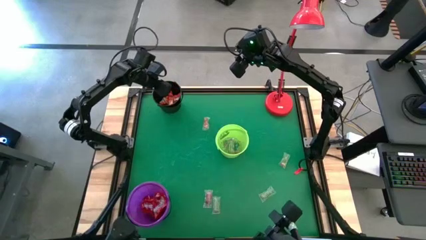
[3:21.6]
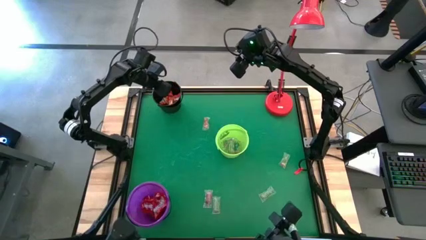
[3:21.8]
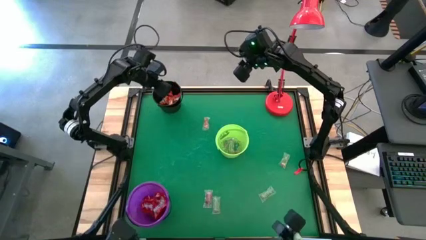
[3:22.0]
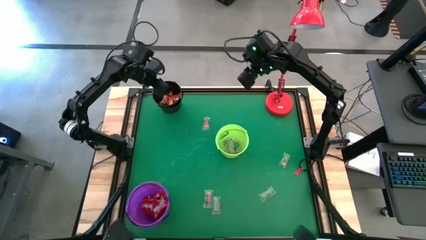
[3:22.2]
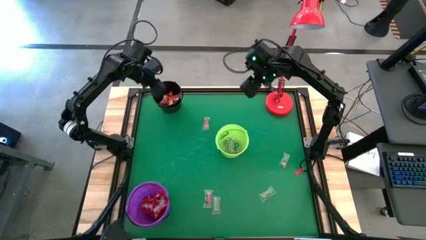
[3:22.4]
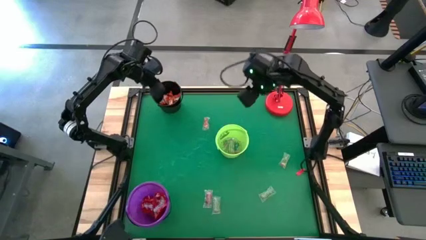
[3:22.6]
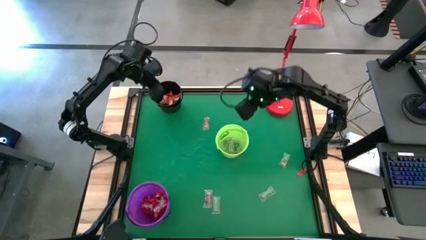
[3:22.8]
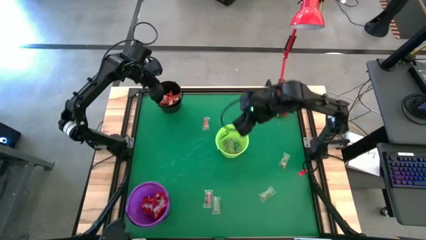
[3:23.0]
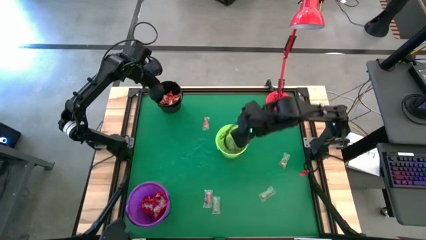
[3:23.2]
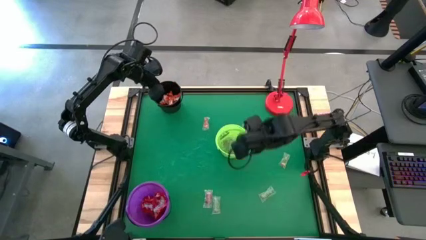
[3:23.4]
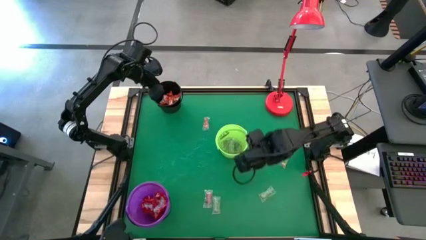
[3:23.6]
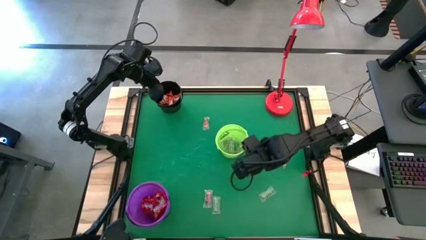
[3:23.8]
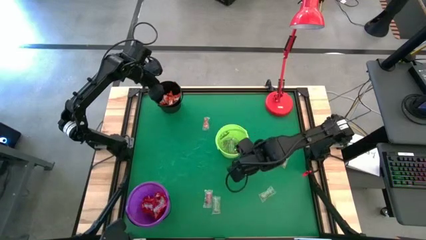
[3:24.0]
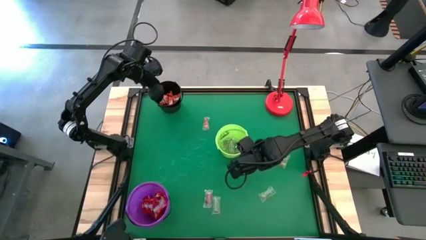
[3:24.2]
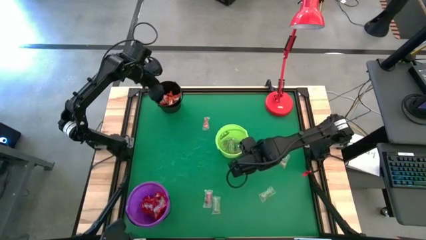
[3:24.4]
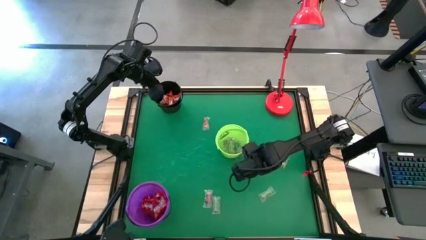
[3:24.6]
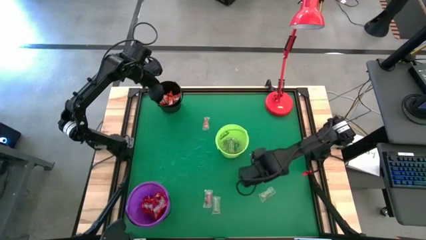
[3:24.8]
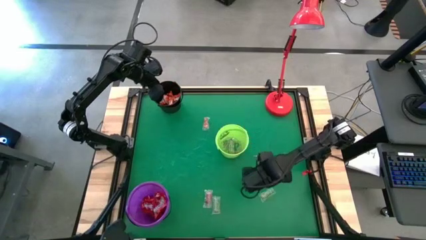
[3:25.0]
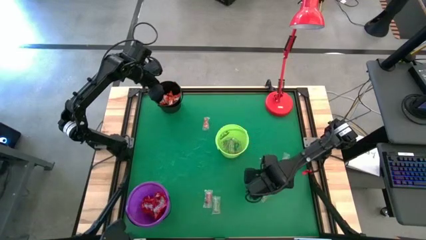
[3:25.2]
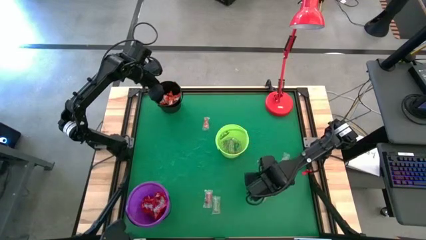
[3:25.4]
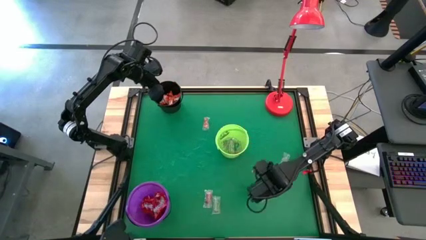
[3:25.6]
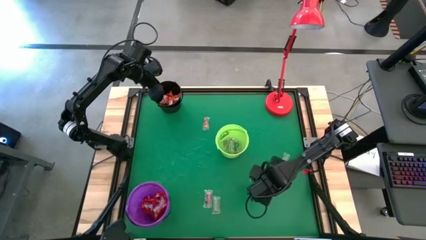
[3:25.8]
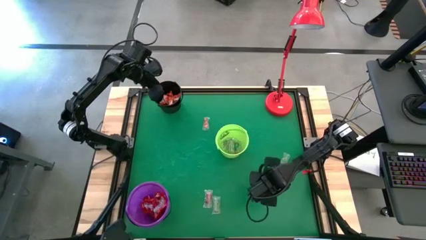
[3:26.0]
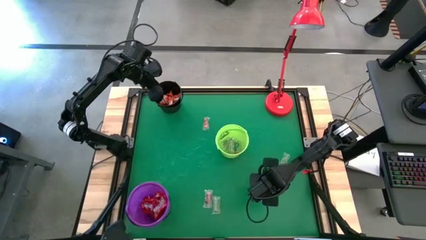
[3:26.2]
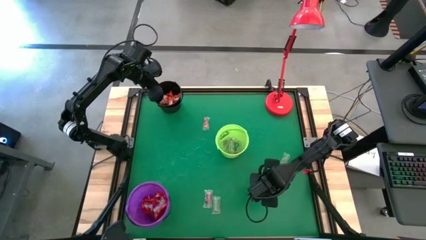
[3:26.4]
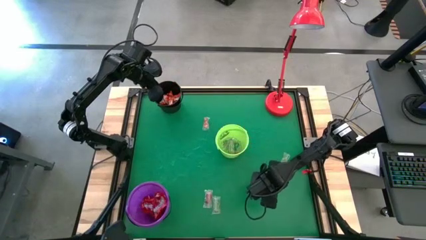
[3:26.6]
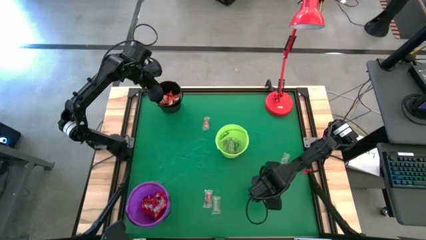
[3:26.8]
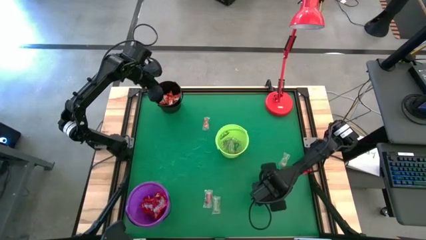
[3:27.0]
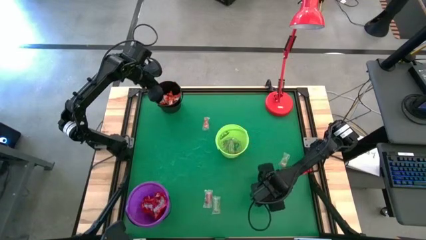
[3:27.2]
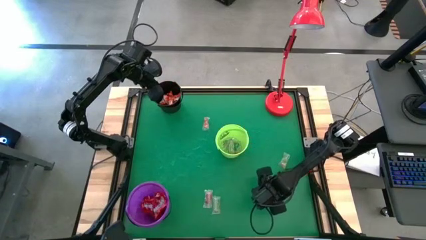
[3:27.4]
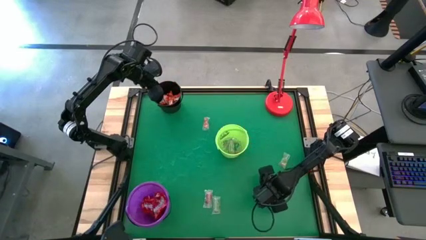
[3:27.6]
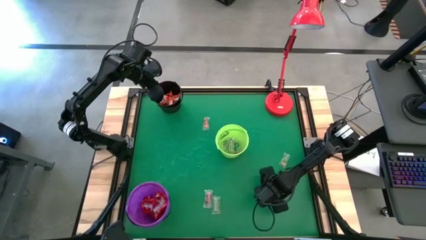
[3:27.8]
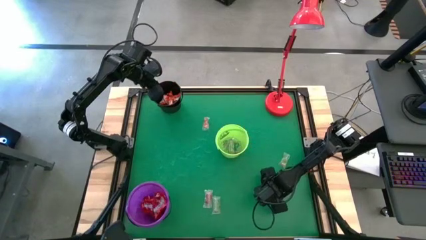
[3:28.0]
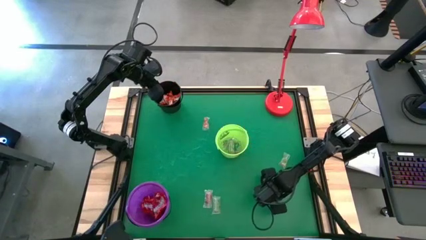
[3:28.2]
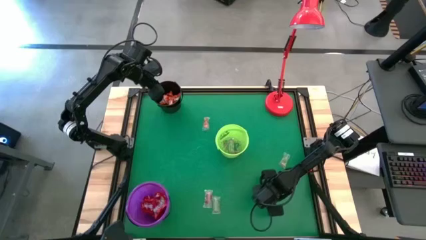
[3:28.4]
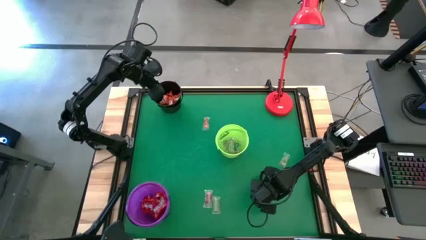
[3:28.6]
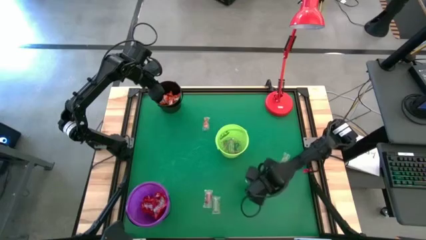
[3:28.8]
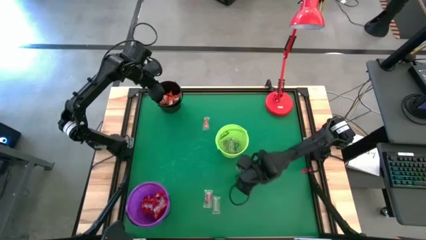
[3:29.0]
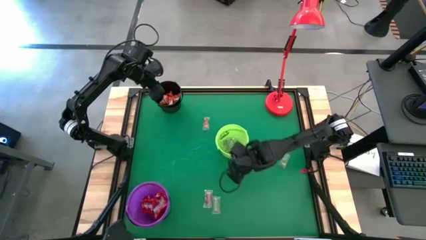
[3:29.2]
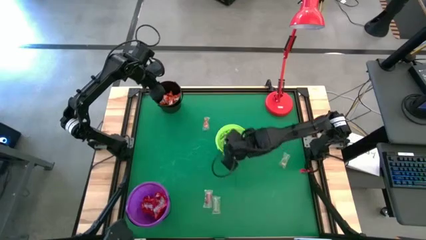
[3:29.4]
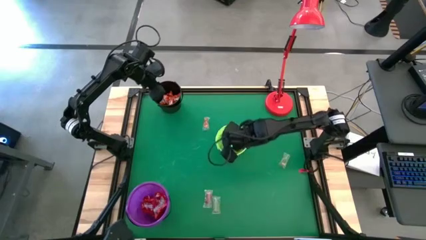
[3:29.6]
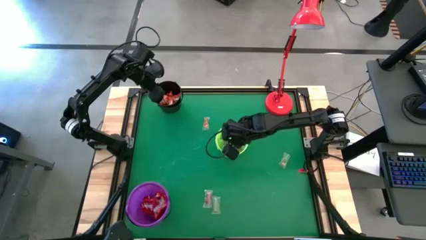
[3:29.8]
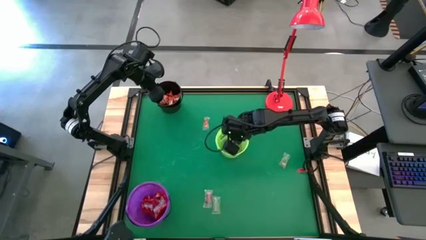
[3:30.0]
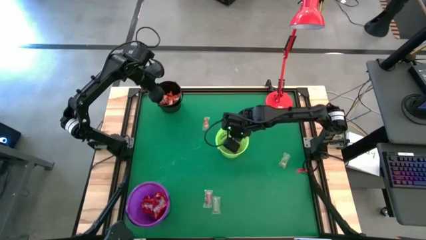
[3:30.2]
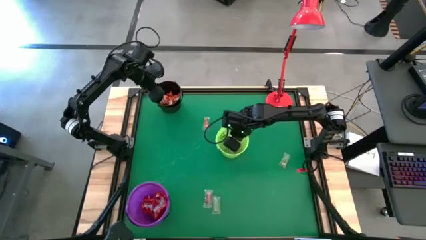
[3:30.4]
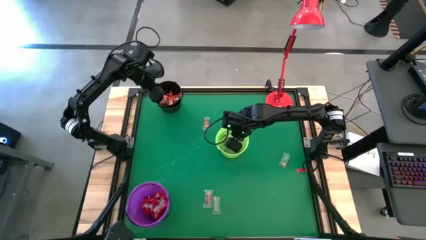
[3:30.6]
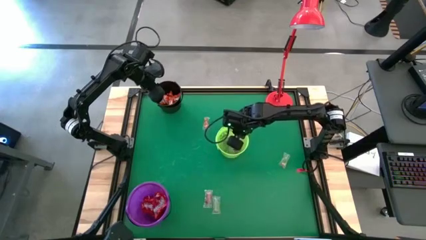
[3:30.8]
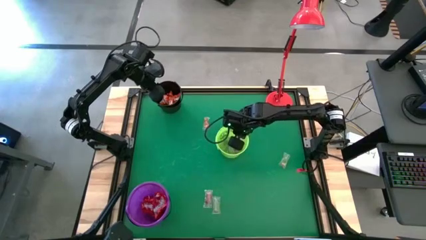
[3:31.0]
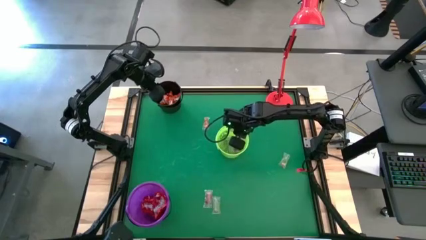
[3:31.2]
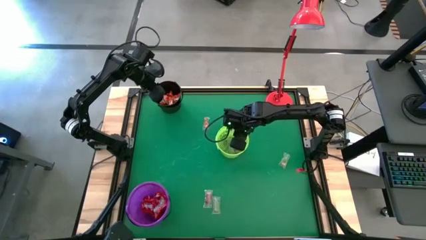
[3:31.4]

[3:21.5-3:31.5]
Task: Sort candy
Put the green gummy into the green bucket

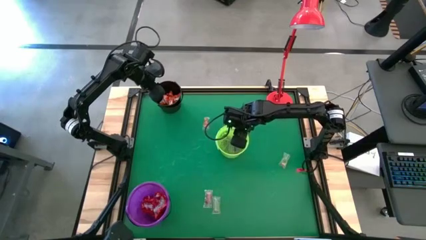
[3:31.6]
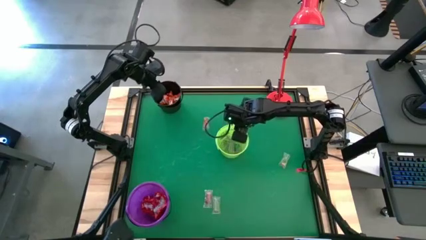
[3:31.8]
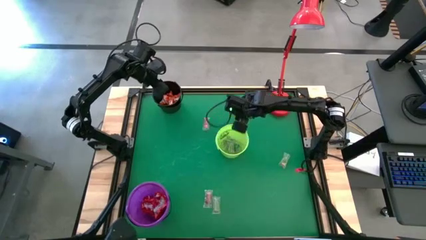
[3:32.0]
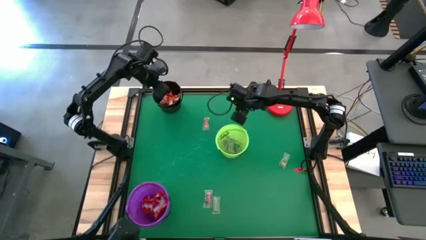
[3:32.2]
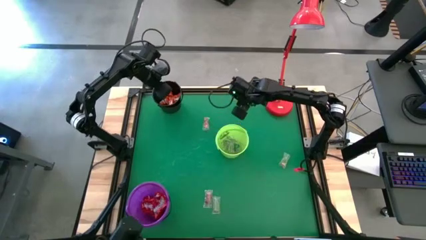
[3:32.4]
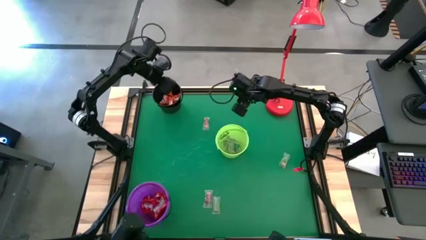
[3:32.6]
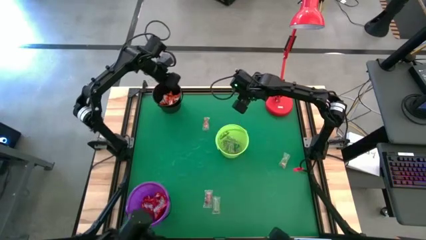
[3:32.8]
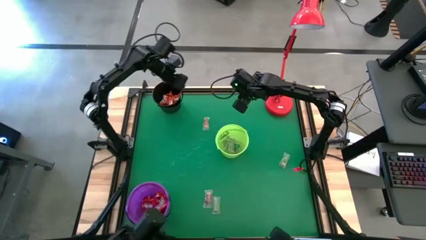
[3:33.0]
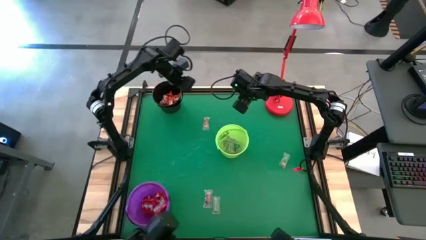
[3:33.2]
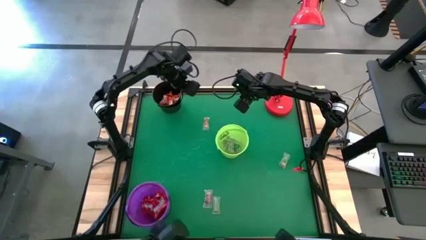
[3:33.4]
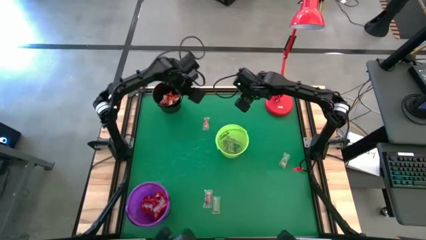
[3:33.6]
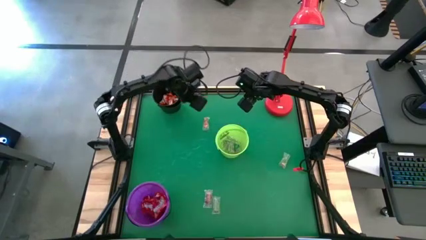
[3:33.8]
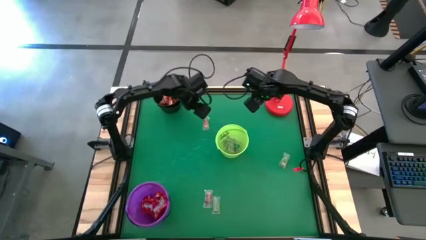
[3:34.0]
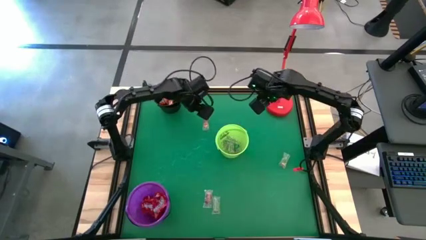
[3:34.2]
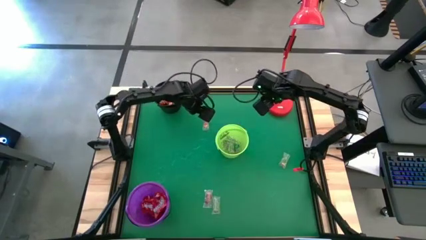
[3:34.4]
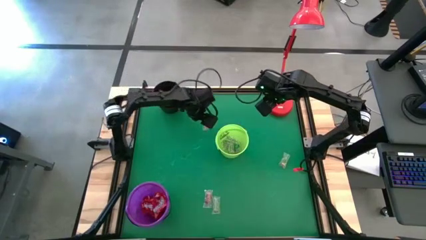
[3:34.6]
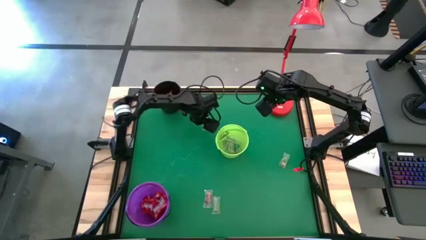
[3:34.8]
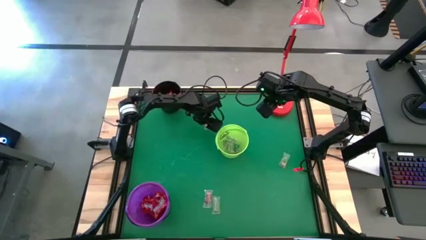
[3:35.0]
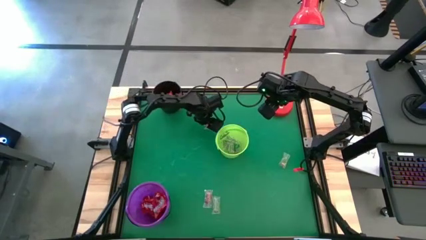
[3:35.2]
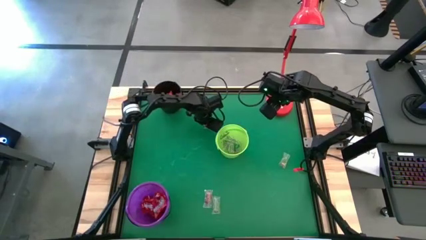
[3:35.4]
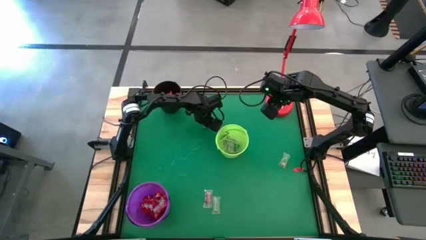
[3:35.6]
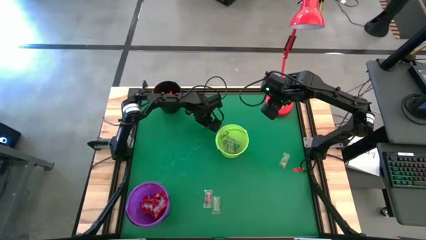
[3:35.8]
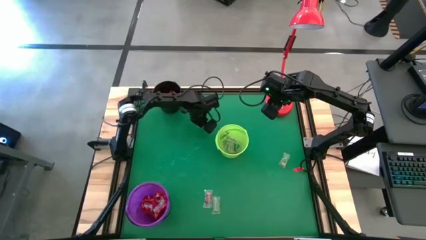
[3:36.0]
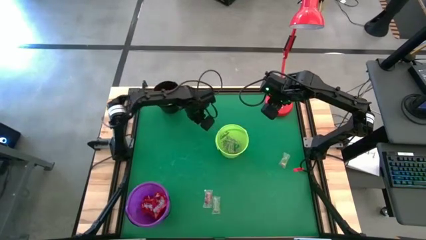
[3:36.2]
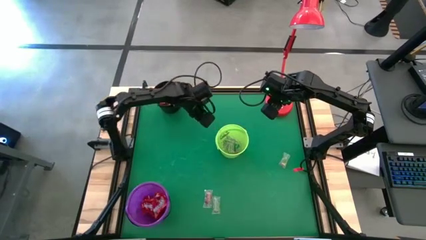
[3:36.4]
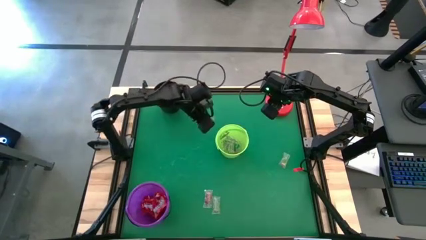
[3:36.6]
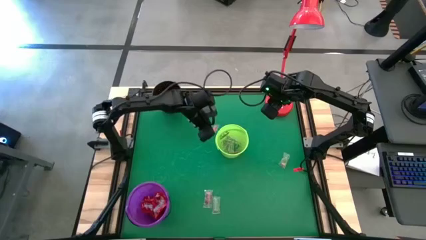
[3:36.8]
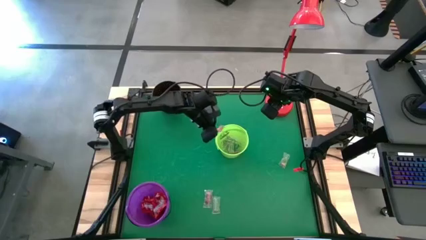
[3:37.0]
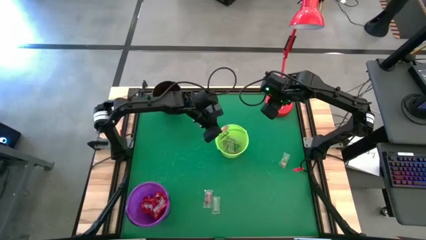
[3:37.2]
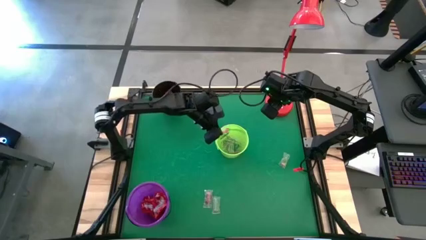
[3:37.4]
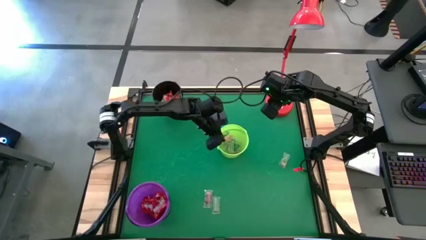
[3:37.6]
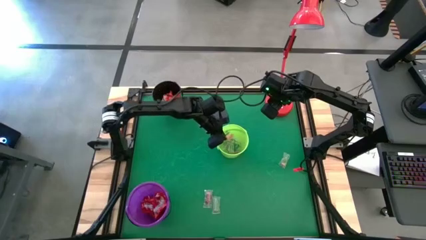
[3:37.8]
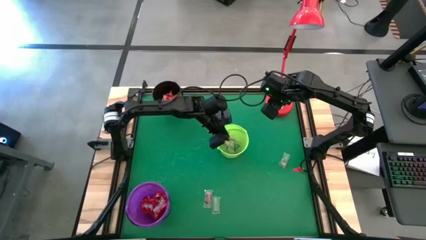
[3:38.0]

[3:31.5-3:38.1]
Put the orange gummy into the green bucket

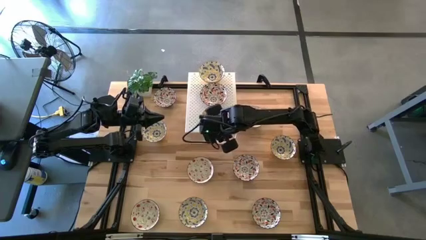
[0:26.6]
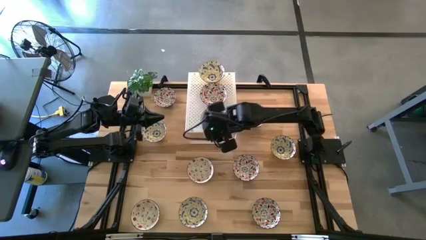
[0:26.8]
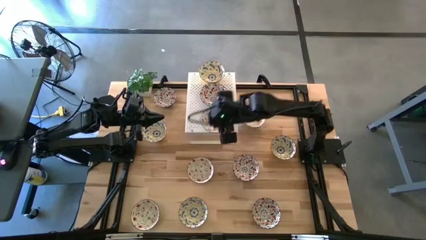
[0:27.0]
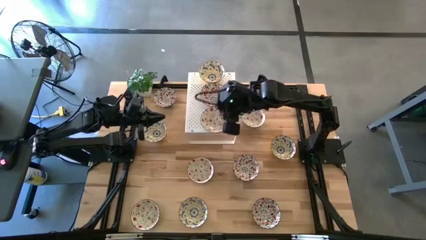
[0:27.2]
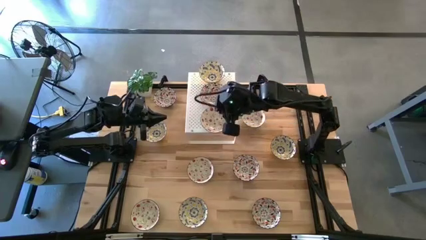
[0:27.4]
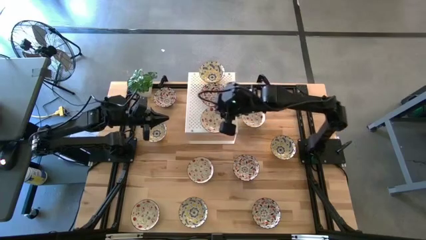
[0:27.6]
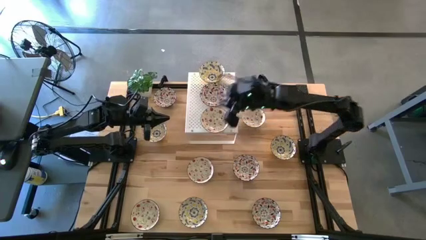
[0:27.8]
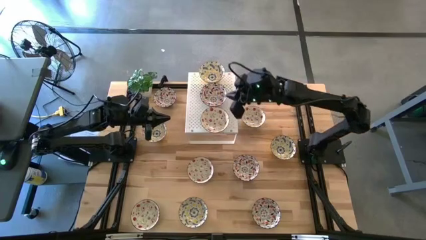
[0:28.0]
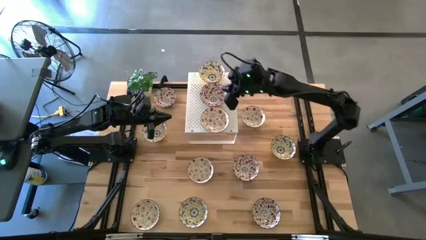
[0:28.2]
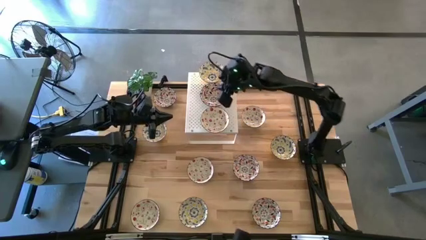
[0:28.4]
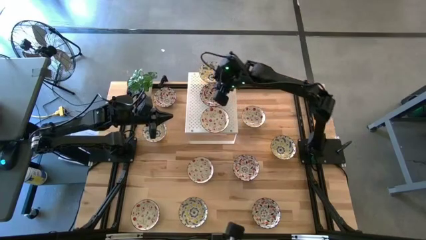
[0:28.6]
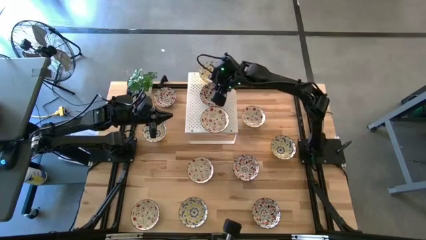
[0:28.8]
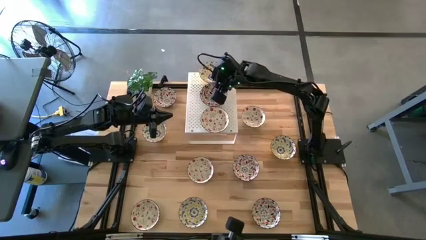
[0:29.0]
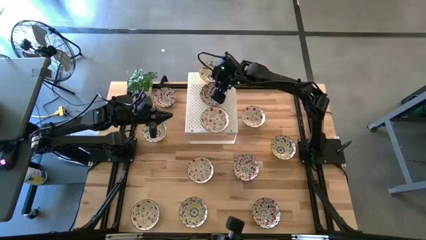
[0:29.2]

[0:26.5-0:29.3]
Task: Pick & Place Mini bowls
Adjust the orange patterned bowl on the shelf
